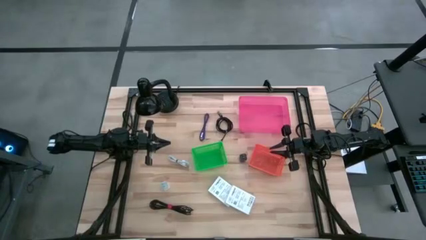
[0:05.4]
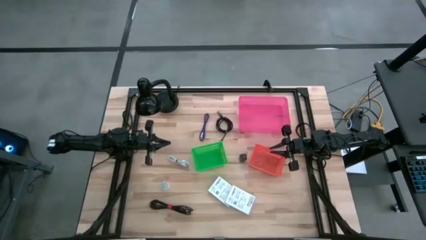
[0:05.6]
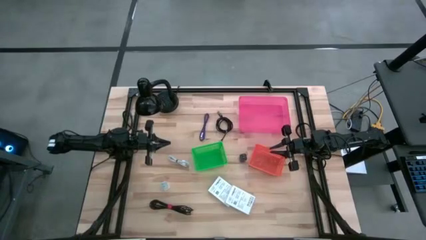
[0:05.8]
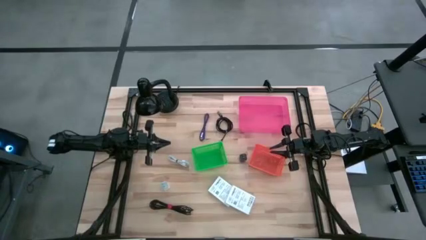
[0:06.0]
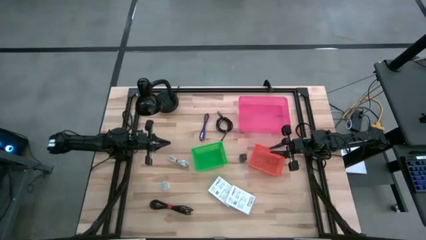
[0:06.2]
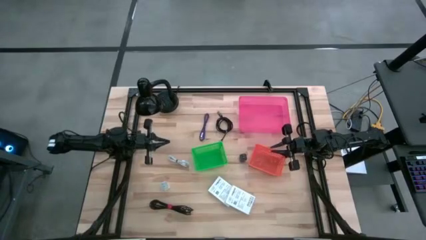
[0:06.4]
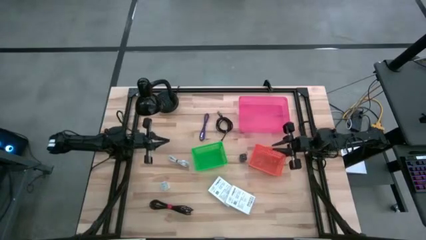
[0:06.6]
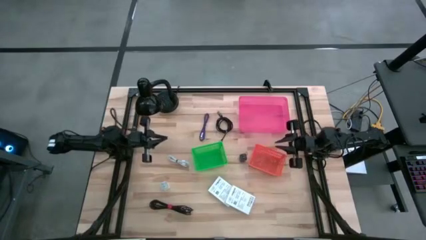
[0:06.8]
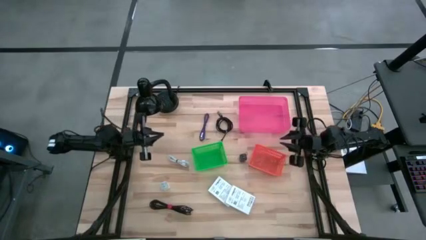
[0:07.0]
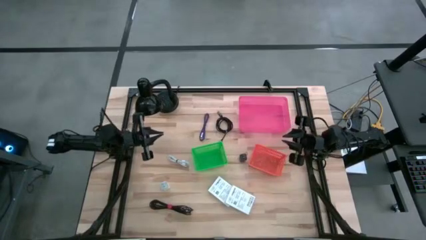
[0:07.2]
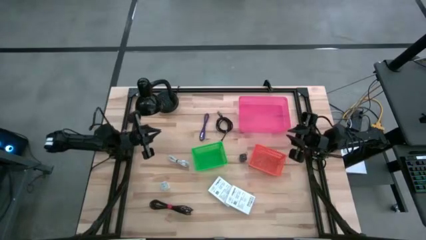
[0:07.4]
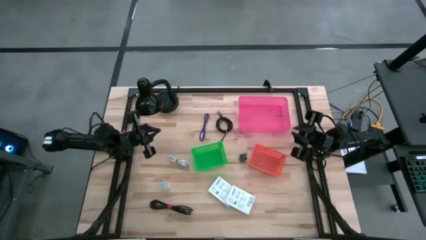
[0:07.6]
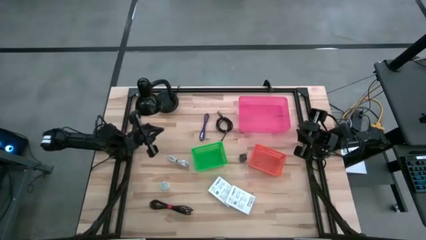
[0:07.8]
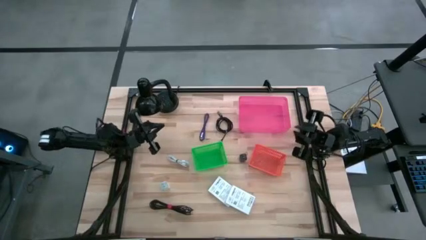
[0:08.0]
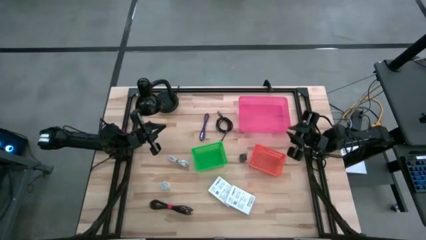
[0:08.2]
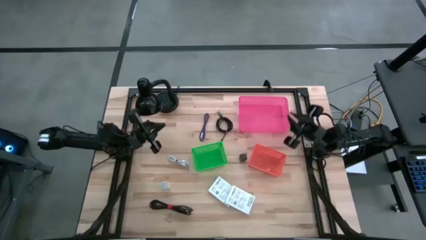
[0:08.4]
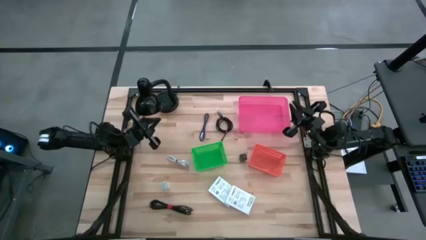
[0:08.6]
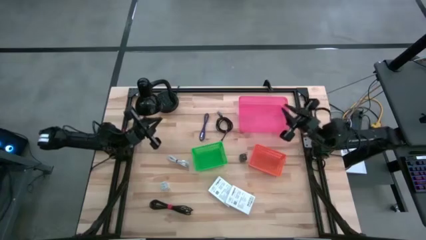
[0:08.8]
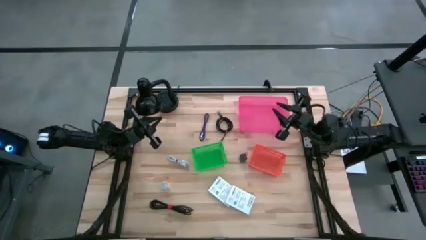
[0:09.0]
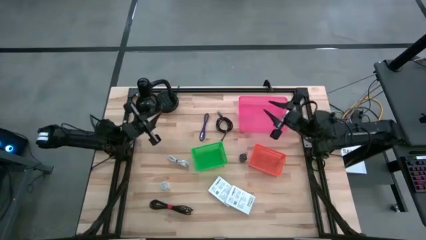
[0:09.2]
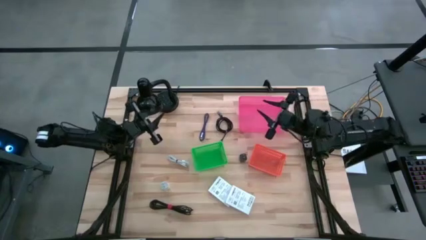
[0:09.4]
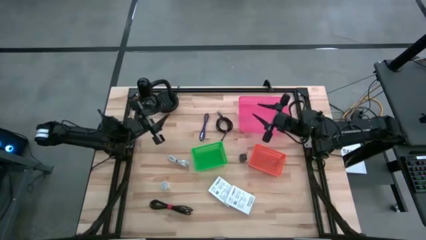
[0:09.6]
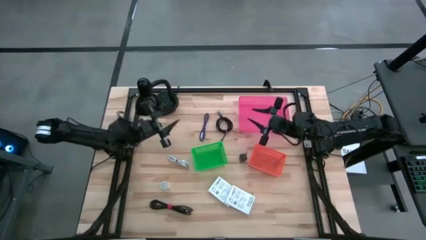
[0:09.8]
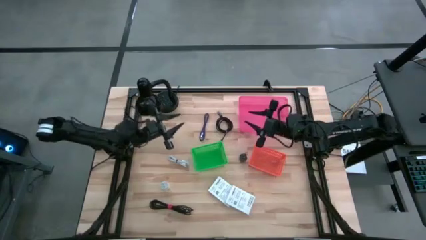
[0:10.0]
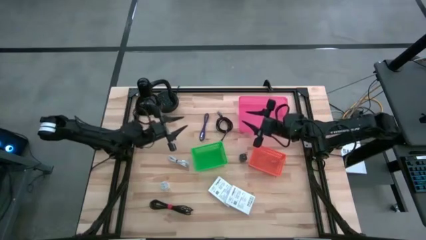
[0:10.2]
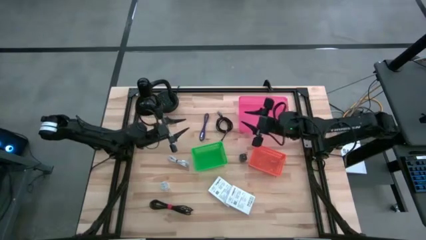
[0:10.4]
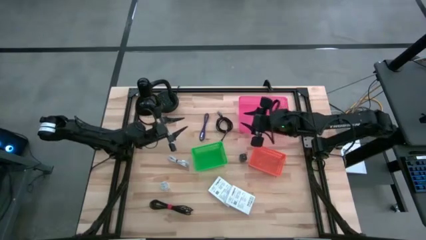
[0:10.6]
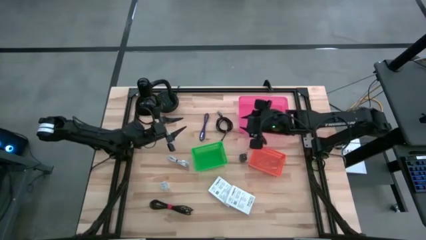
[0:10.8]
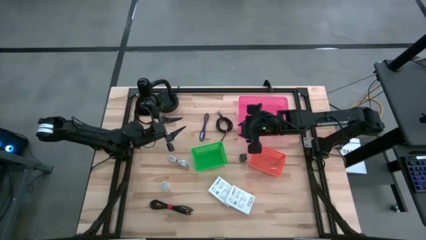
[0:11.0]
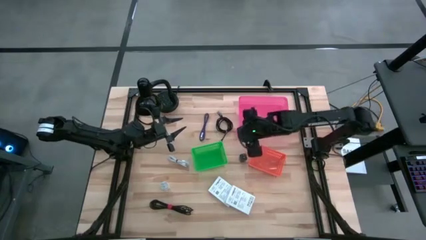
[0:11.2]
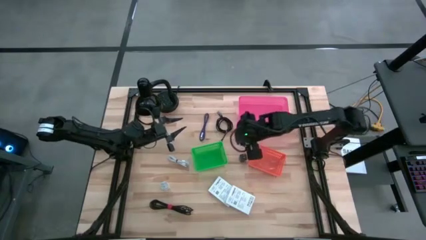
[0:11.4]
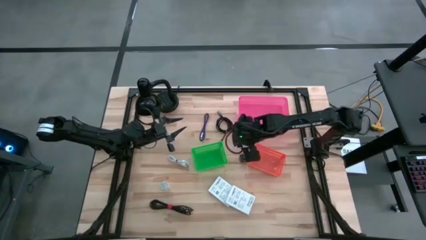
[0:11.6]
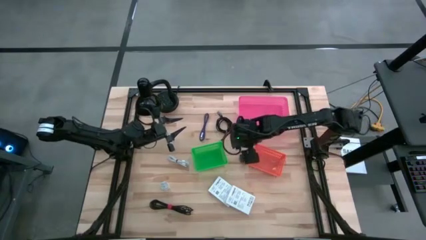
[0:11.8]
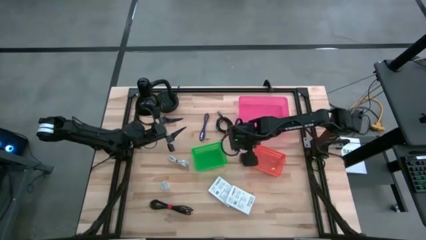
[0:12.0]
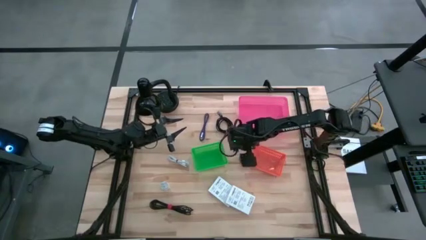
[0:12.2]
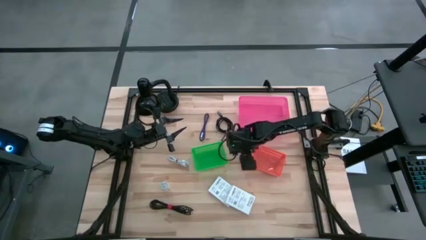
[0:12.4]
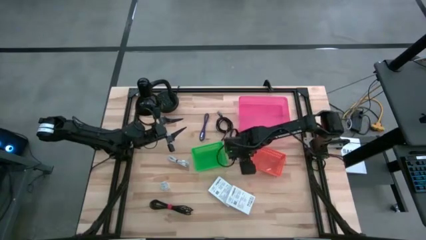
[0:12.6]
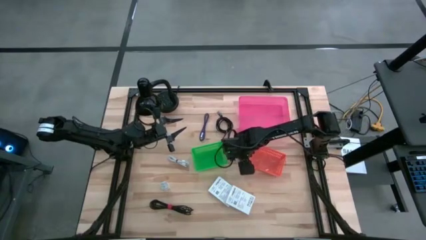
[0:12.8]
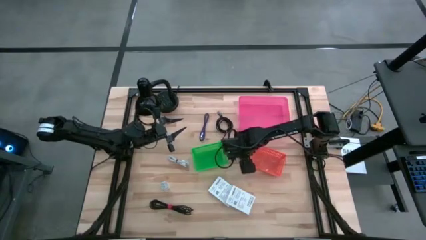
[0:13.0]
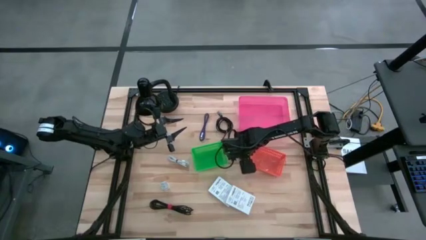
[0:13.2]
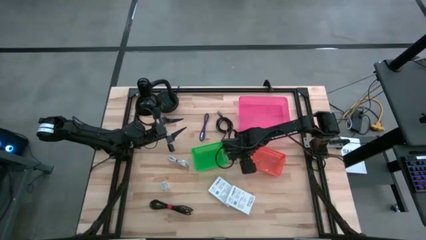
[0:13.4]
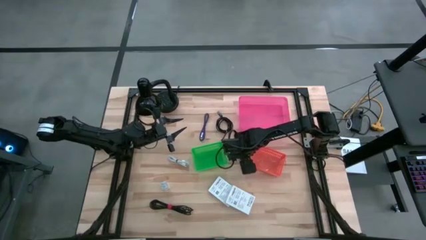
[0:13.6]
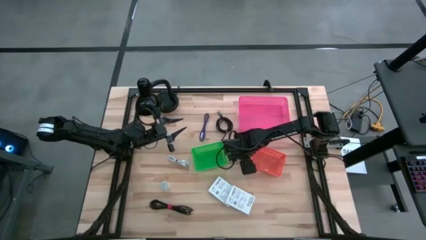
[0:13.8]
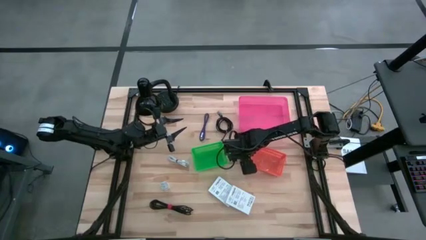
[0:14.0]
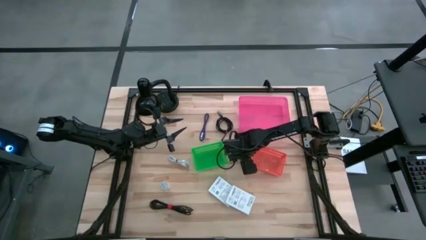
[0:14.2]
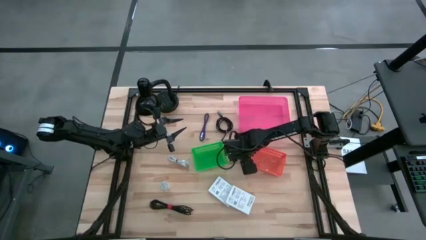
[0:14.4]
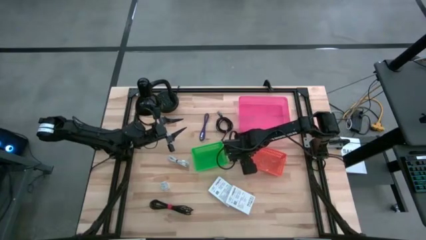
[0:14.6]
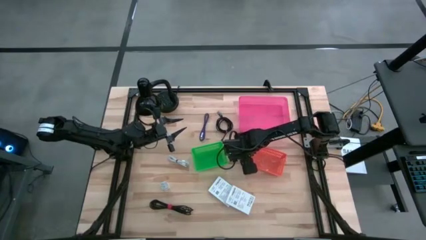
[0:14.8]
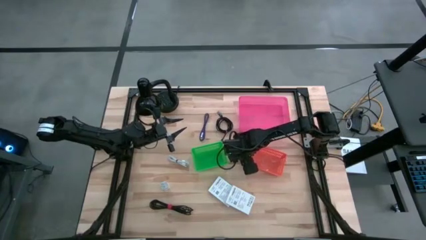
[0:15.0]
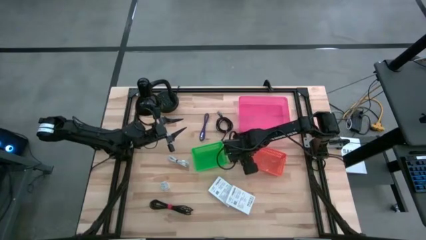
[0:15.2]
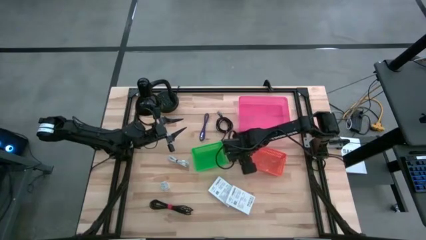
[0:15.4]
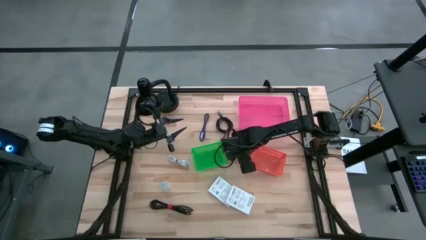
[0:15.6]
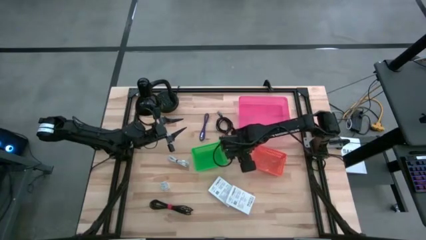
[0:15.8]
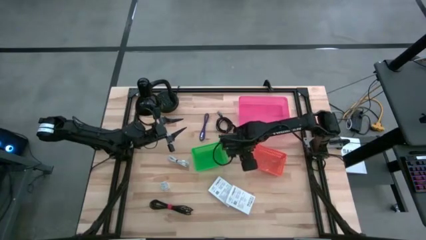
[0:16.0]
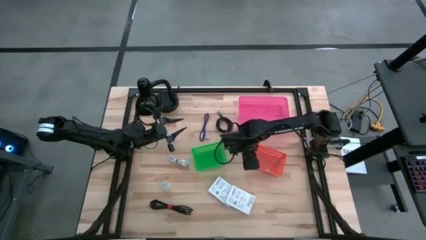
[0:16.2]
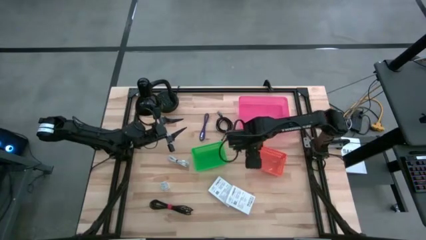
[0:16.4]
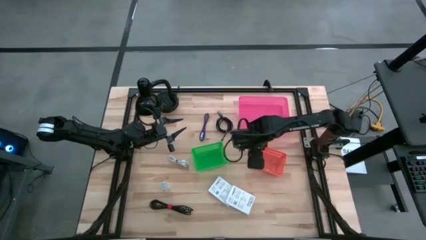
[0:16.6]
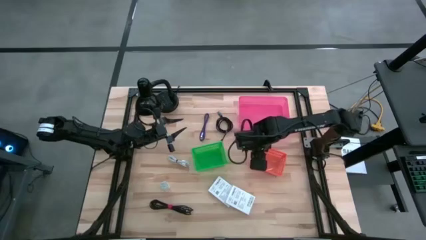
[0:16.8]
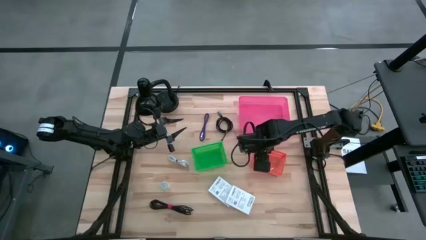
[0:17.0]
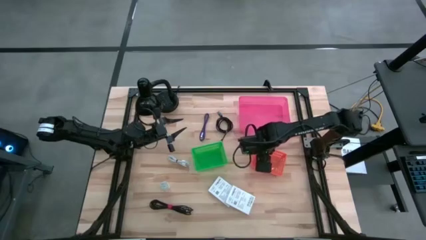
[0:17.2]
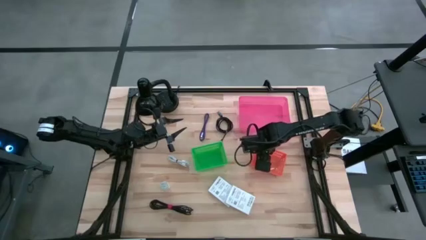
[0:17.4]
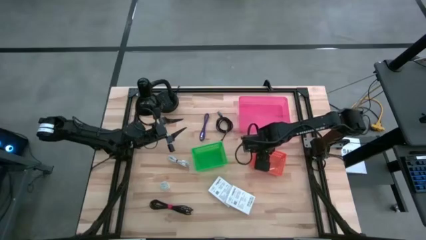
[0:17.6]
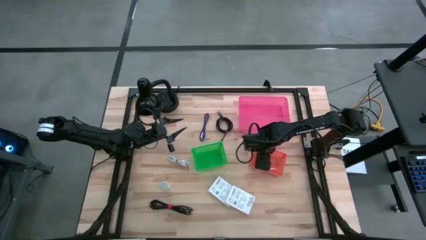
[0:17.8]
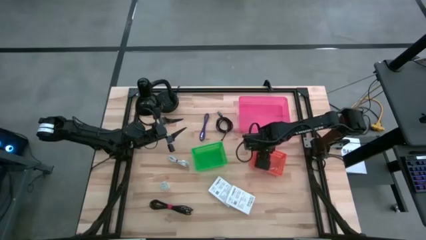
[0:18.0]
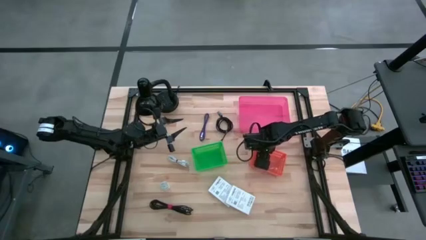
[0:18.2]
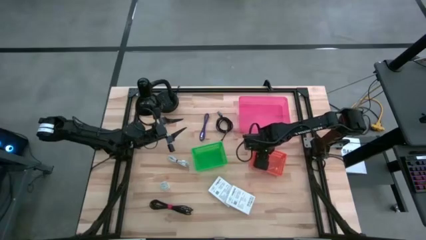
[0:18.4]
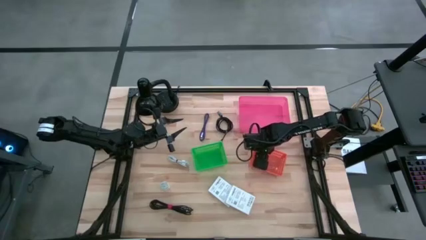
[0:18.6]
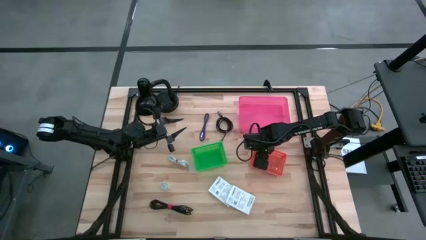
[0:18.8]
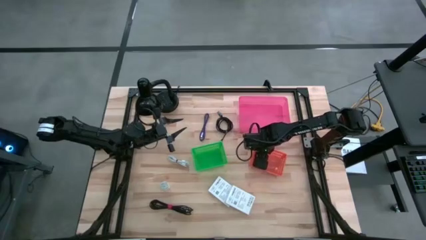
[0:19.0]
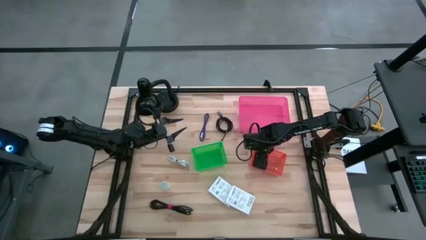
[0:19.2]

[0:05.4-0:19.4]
Task: Pick and place items into bin
Put the black charger adapter into the orange bin
